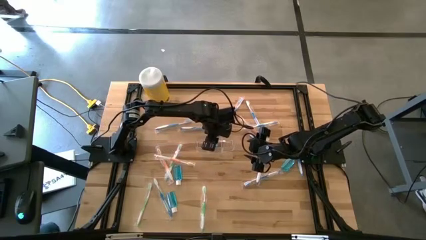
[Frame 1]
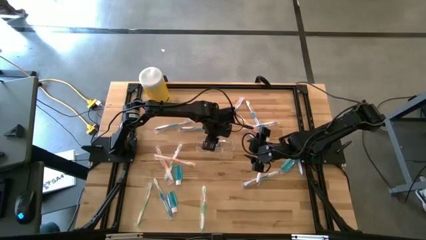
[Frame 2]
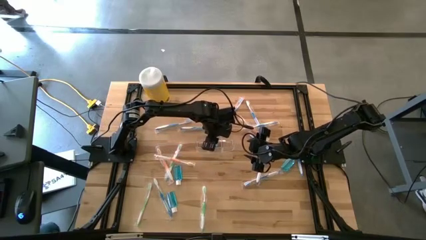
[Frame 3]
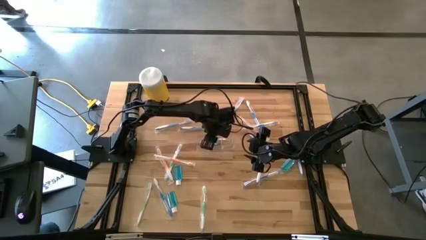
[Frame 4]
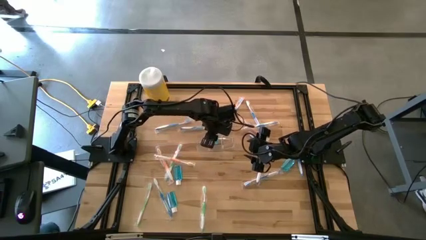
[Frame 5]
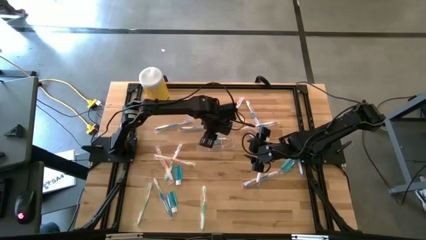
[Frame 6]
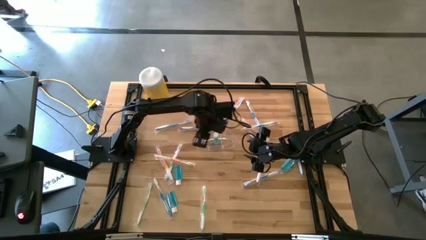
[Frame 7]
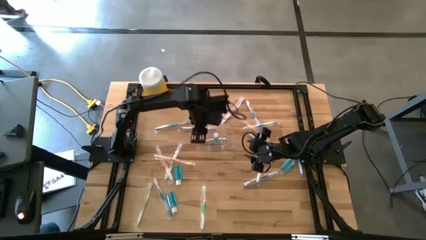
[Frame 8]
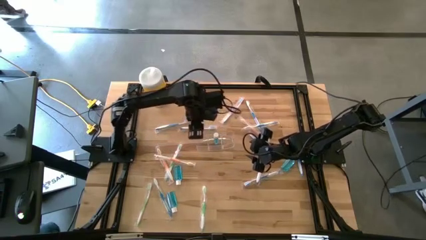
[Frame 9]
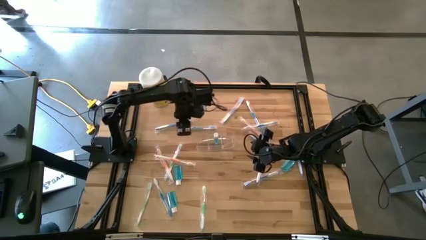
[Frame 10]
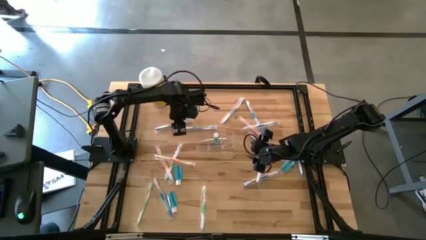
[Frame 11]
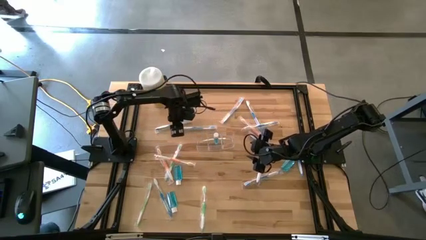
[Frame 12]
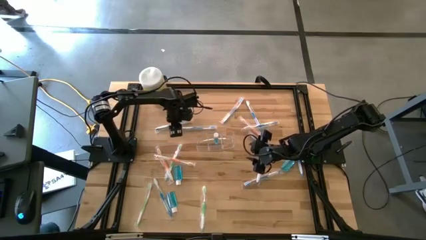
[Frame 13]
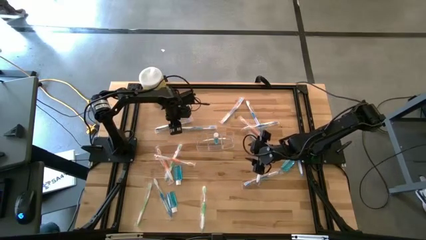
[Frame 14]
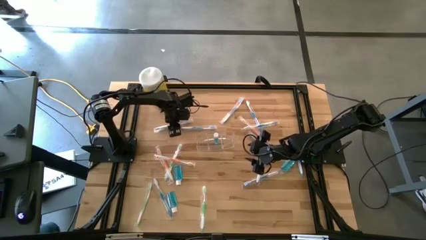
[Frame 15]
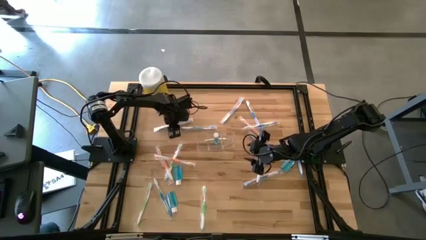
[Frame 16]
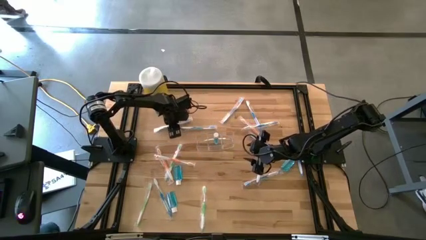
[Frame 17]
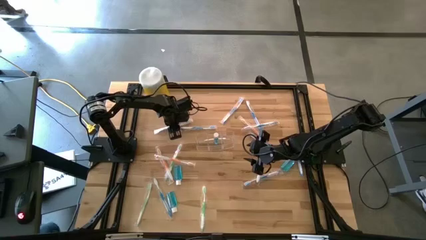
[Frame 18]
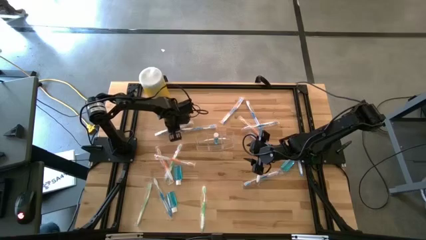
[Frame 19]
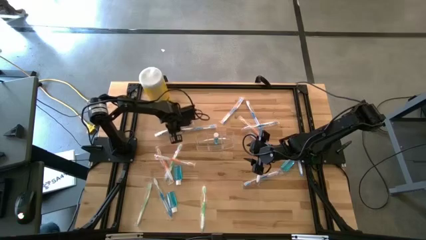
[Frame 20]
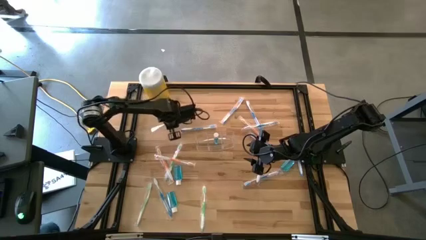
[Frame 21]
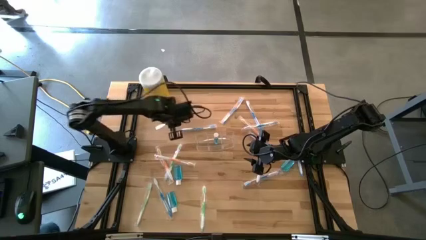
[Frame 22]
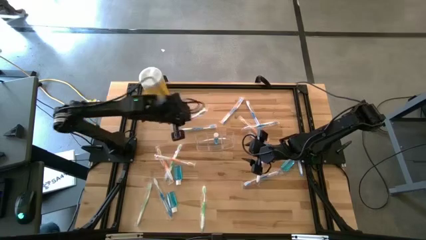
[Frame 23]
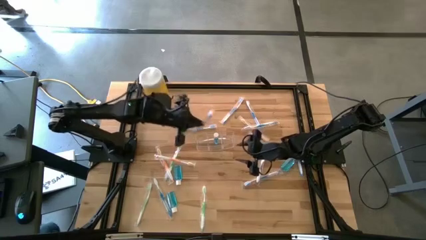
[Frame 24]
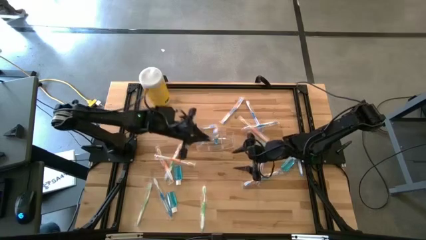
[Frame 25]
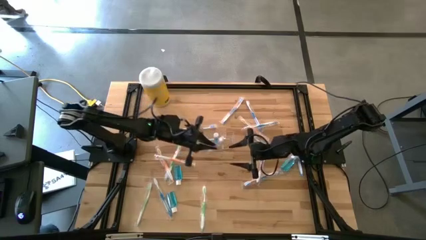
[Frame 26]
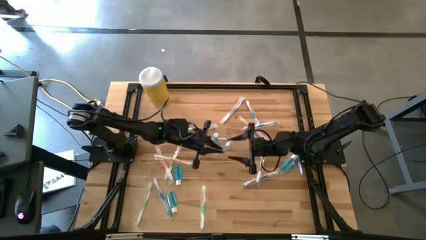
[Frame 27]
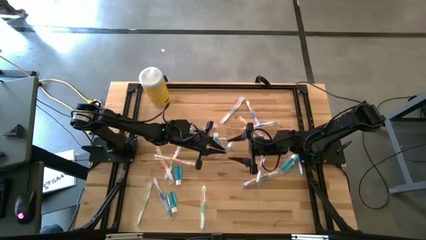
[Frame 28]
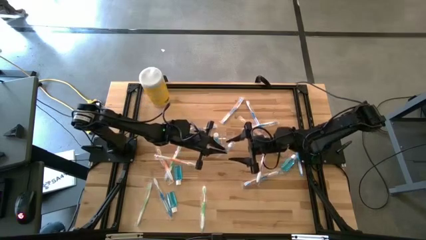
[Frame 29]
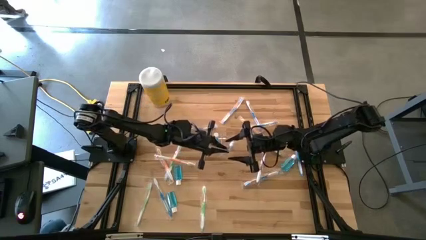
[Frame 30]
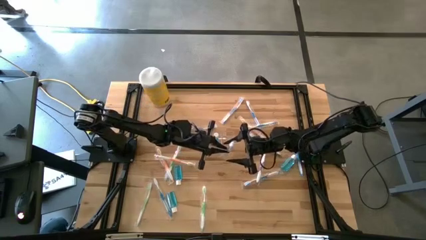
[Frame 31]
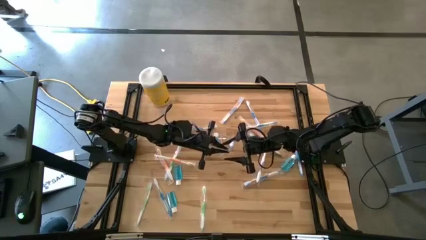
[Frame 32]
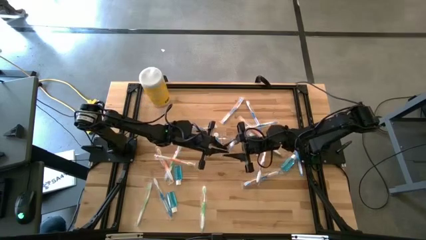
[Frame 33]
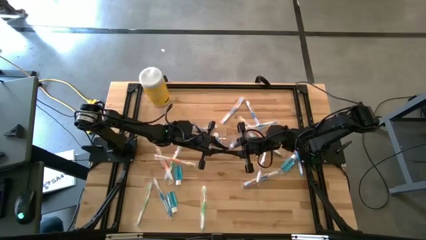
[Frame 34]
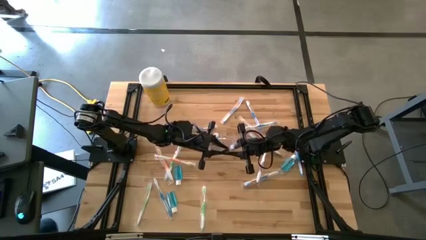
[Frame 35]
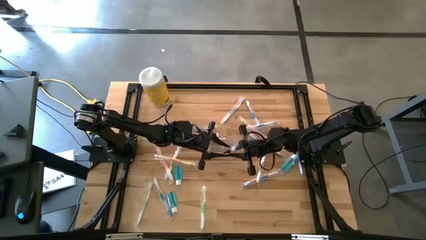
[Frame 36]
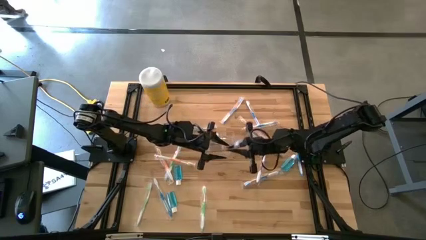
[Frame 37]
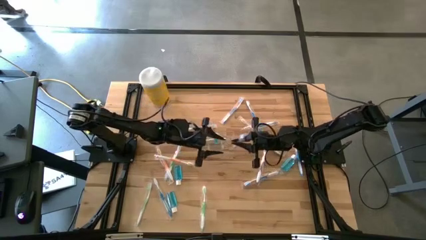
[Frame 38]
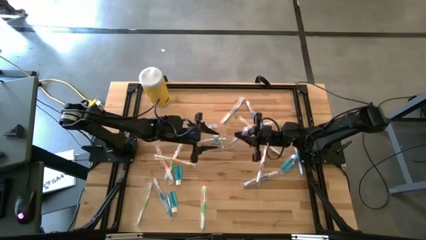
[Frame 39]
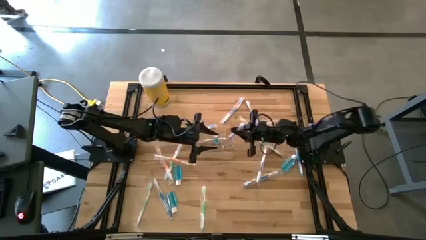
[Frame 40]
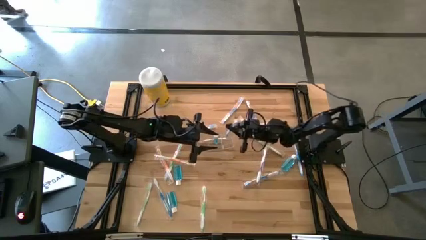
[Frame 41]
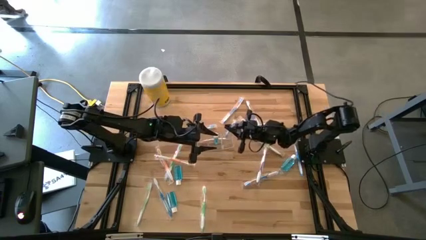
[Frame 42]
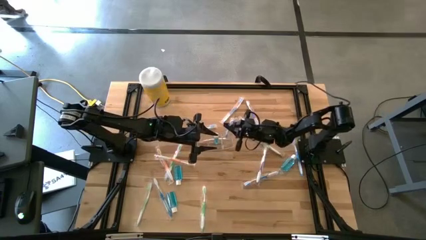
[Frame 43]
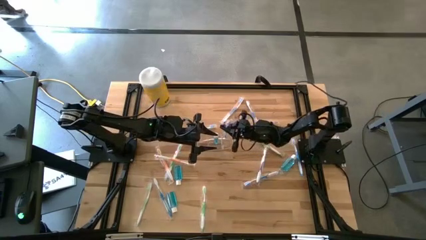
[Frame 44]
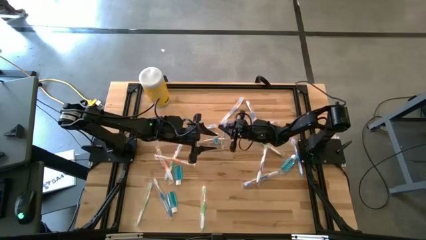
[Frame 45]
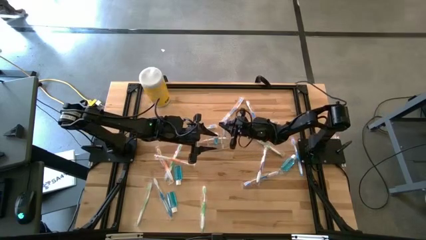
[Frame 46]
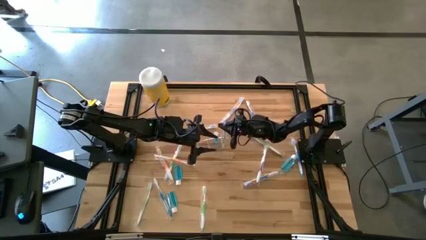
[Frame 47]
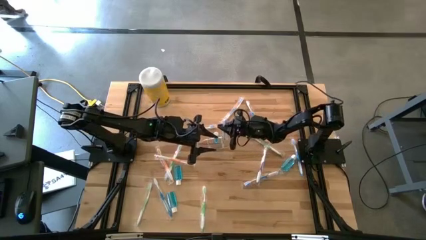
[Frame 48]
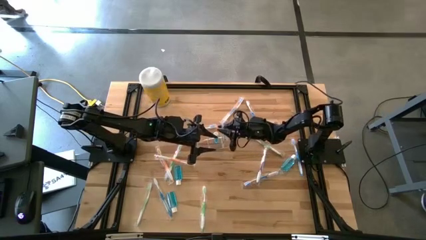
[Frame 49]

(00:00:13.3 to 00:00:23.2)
Task: Pick & Place toothbrushing station
Put the blue toothbrush into the transparent organizer

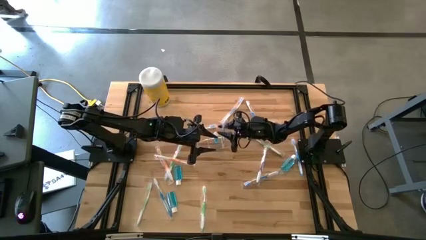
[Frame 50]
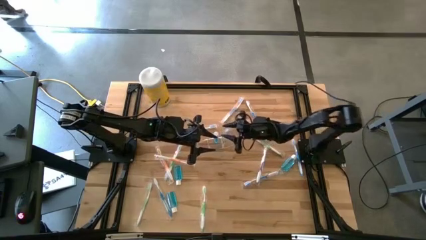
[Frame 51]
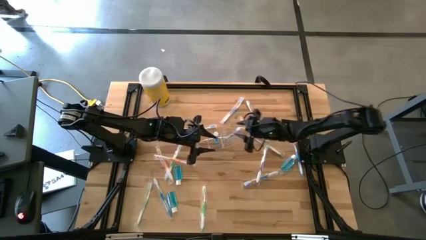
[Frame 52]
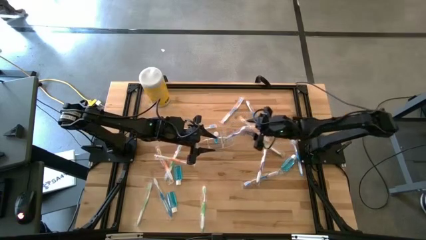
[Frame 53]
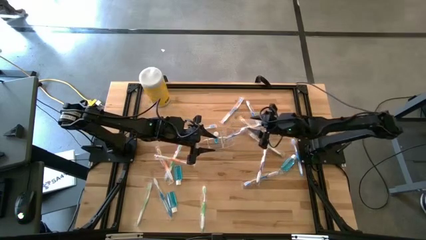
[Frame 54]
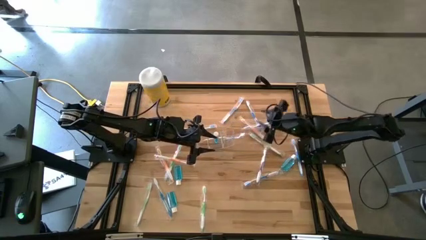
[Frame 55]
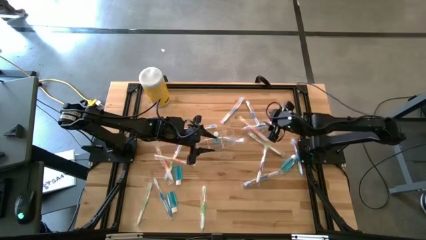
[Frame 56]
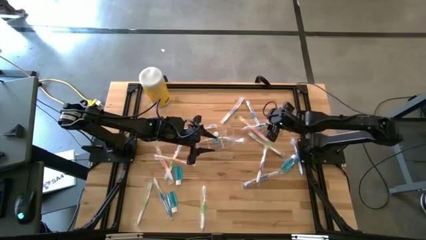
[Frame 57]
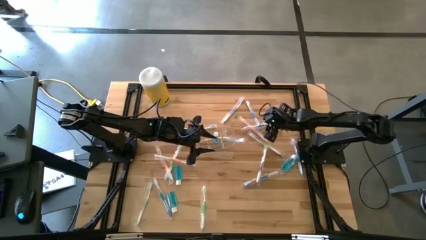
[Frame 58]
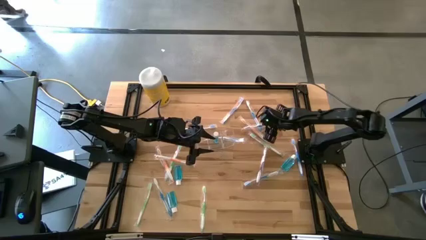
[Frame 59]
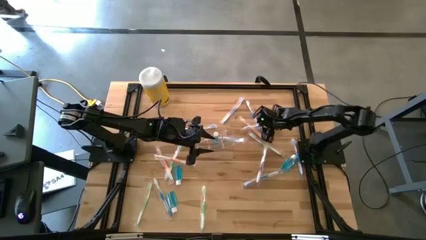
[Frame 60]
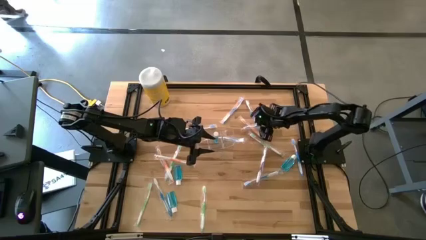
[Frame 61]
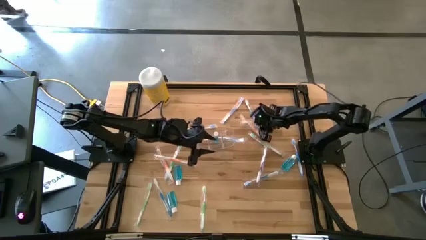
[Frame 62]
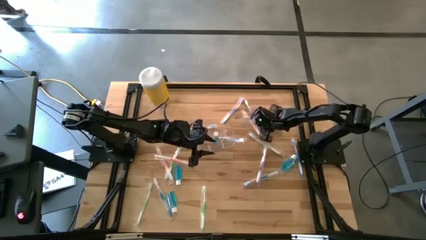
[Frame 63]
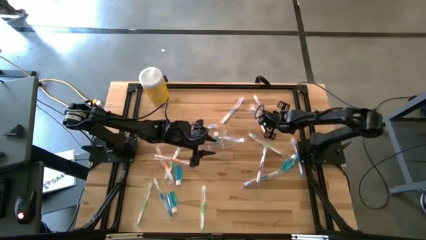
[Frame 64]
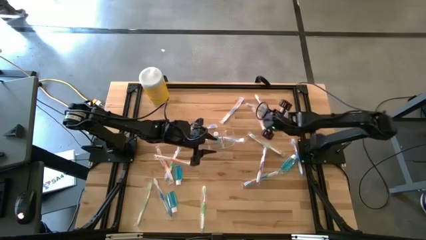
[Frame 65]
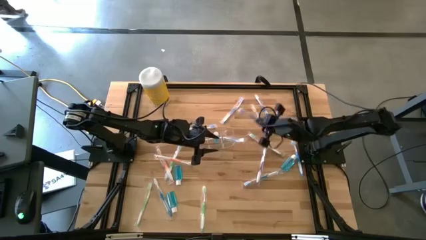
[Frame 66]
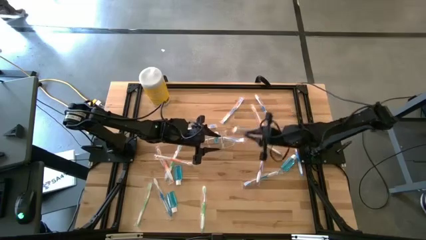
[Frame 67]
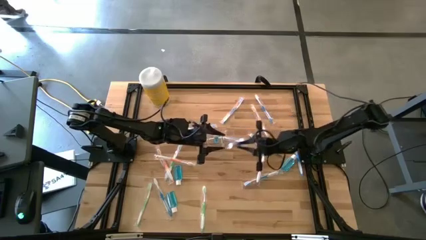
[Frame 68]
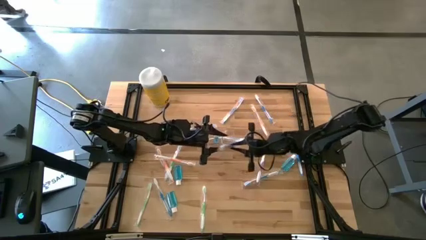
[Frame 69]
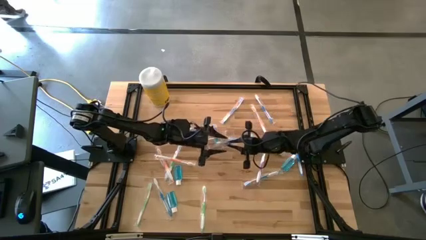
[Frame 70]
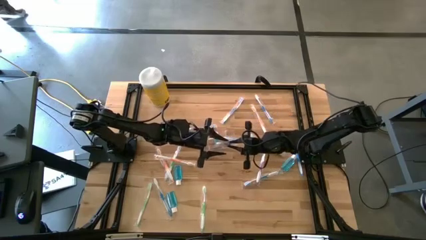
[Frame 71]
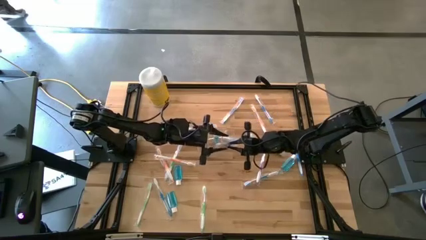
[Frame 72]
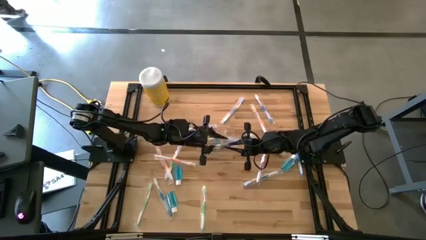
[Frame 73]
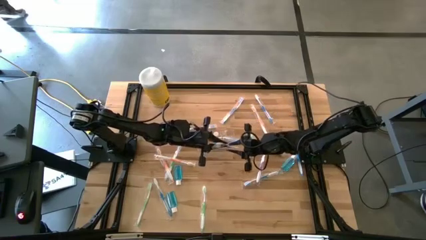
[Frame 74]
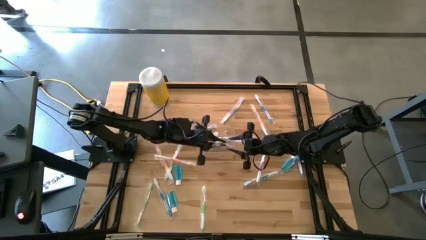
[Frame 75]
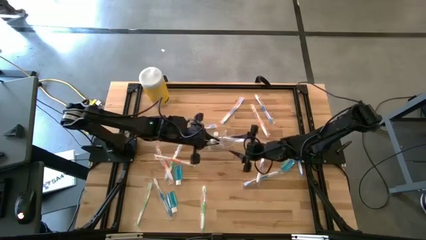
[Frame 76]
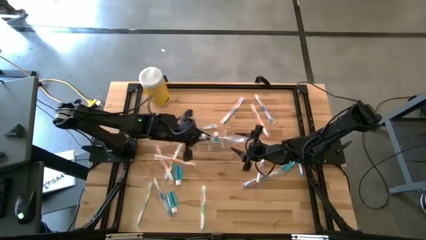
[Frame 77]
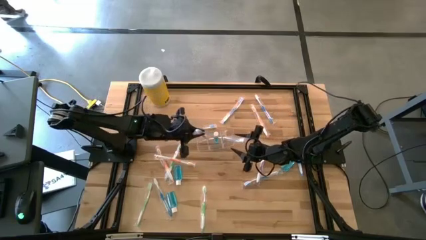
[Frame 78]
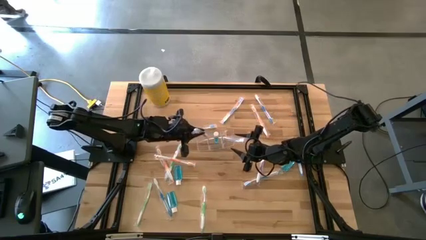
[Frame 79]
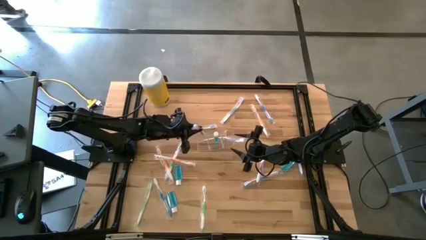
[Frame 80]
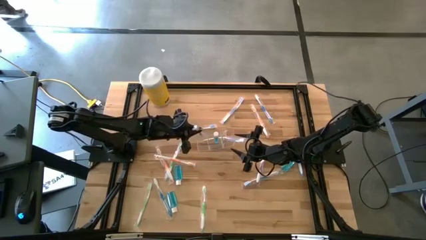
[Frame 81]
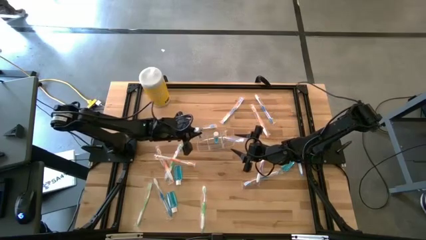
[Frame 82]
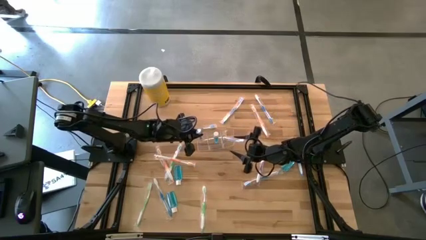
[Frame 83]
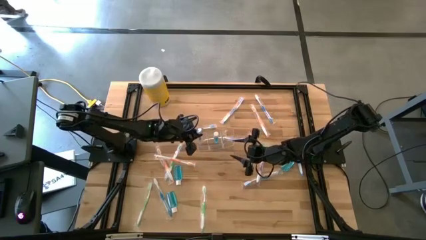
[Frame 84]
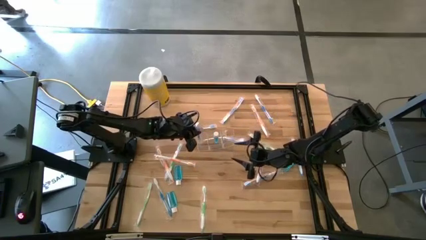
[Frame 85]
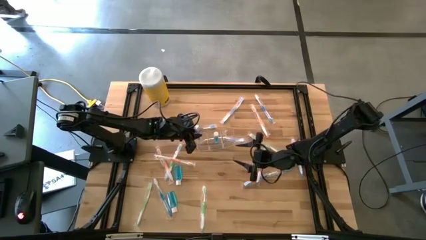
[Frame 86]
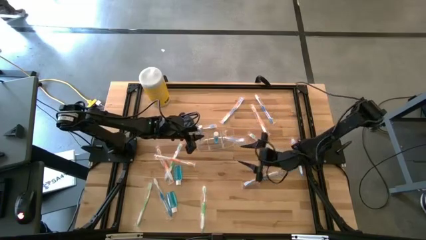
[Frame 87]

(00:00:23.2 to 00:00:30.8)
Put the blue toothbrush into the transparent organizer
